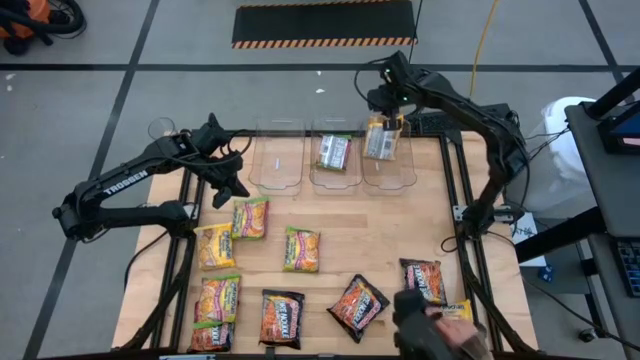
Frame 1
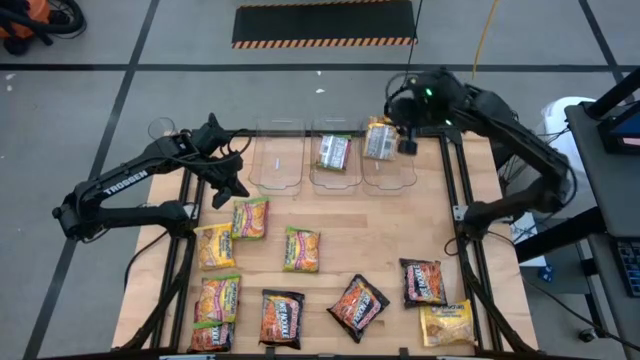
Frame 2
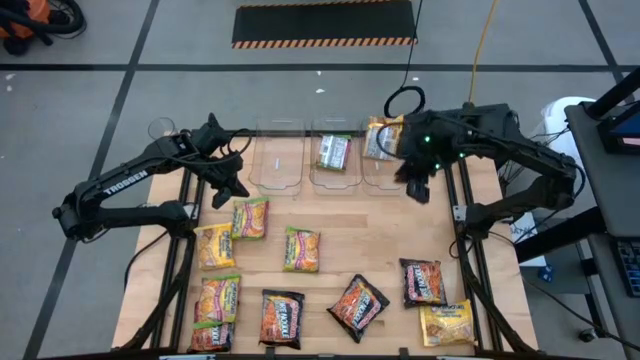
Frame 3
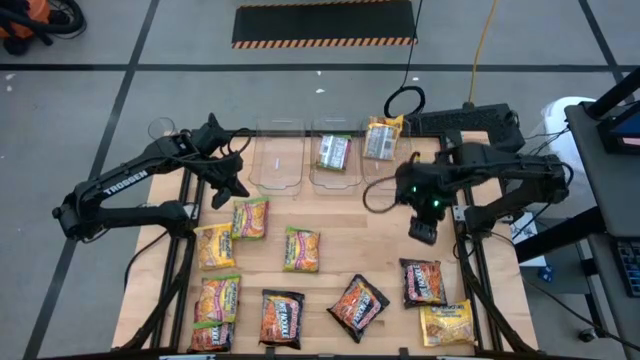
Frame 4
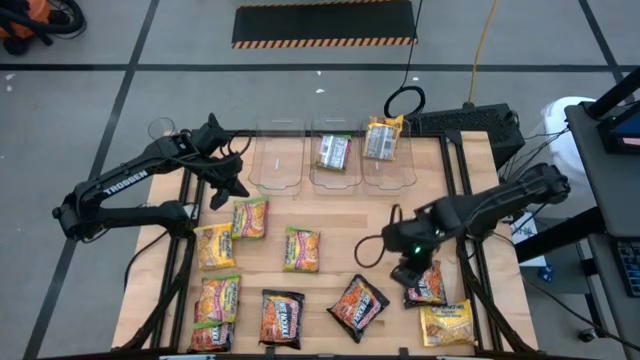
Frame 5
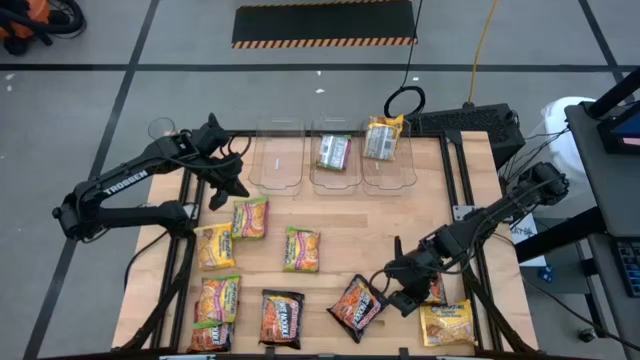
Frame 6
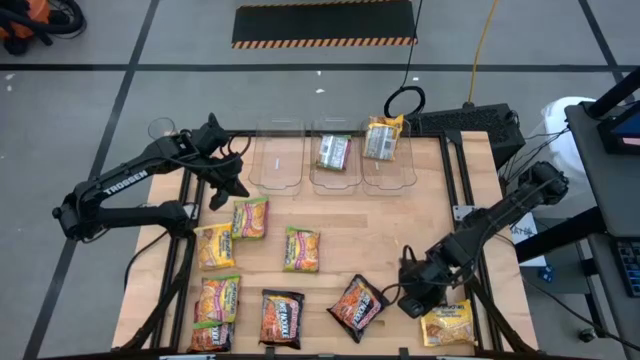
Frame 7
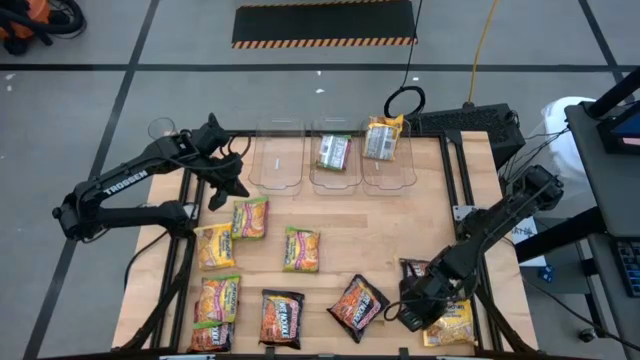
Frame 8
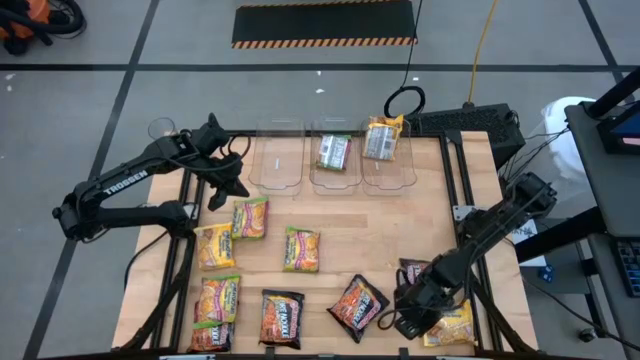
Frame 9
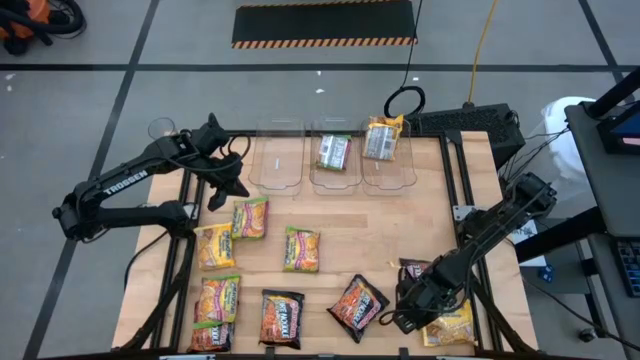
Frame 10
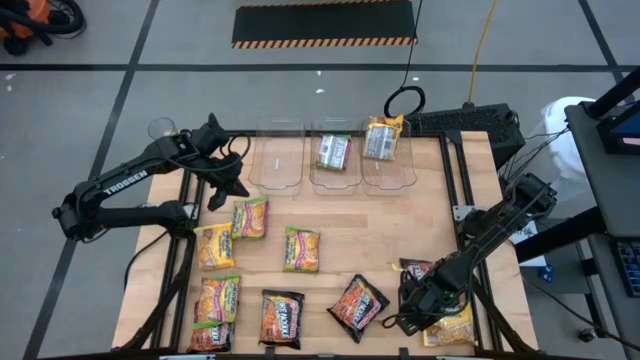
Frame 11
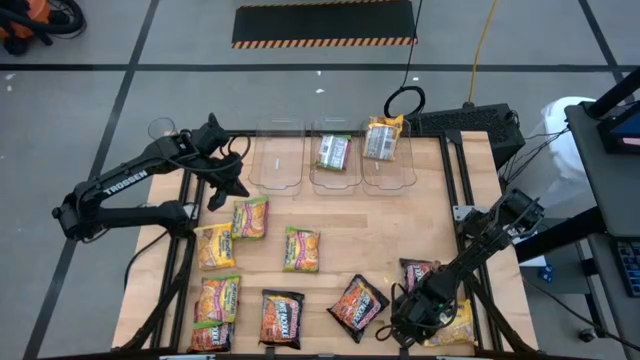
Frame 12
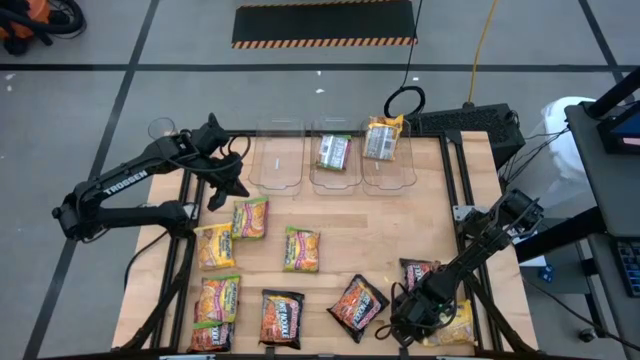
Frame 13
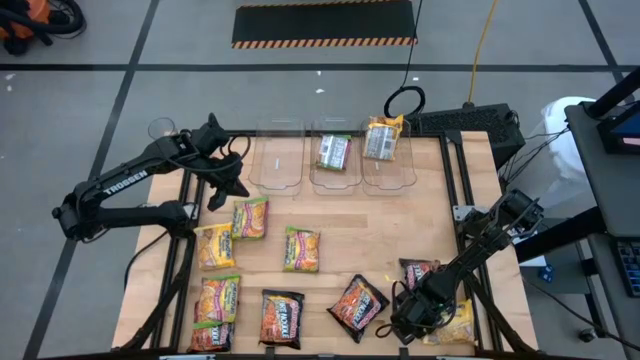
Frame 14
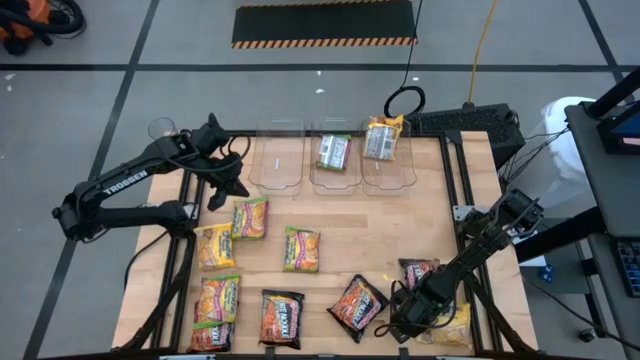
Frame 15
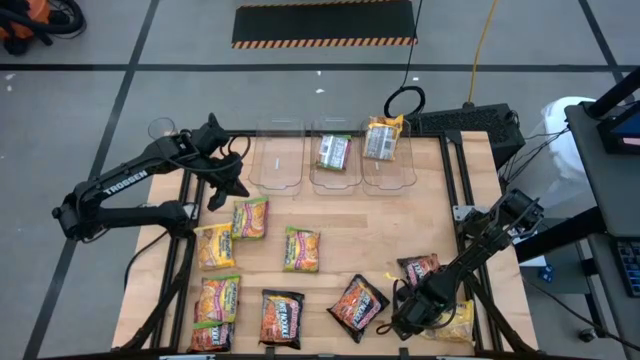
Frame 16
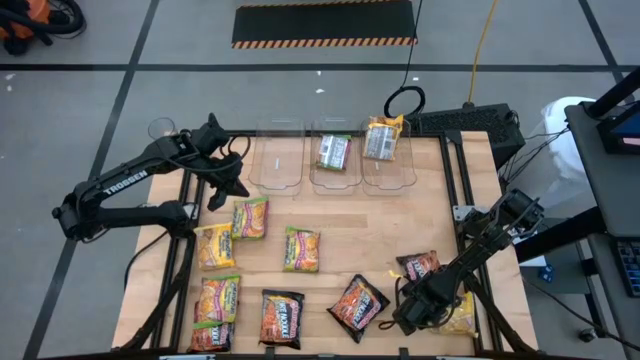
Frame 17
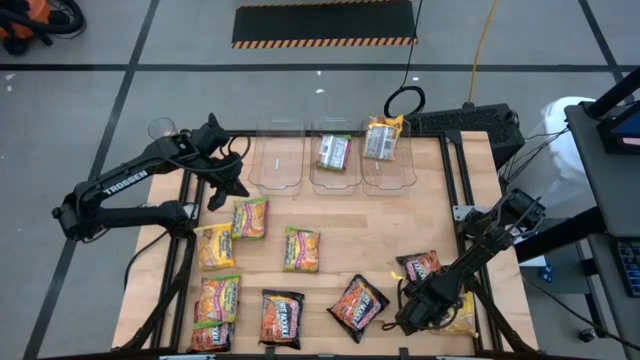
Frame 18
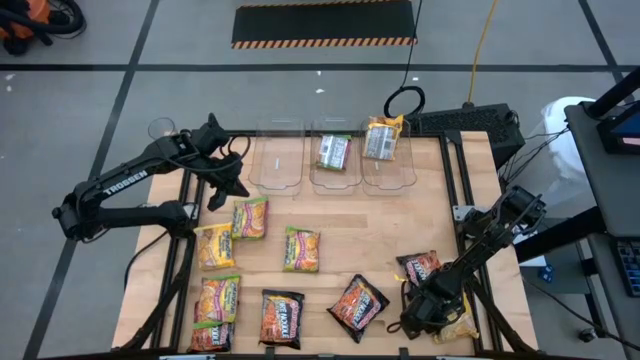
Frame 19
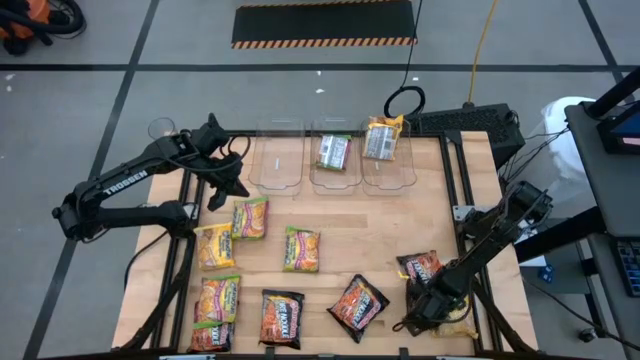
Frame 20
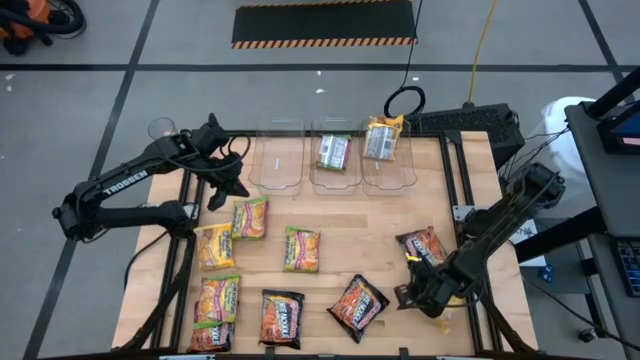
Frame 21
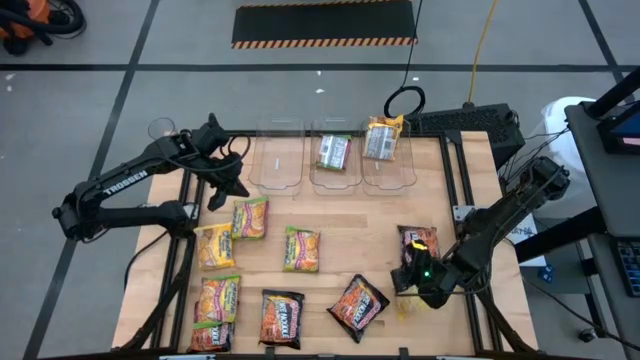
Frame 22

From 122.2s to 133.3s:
Task: Sort Maruchan noodles
Put the yellow noodle pack into the right transparent bin

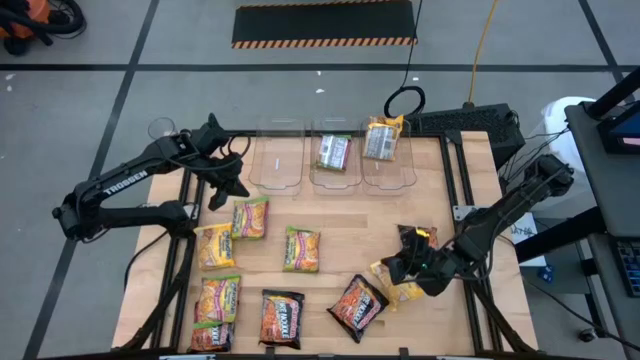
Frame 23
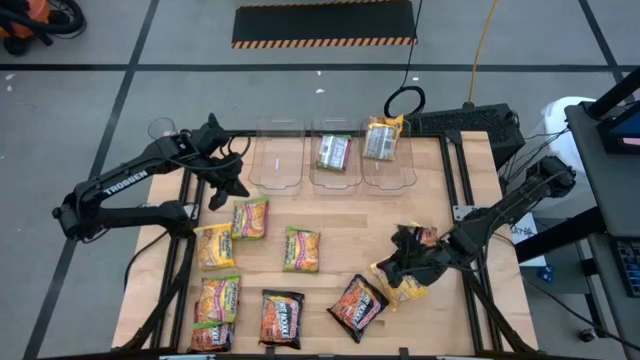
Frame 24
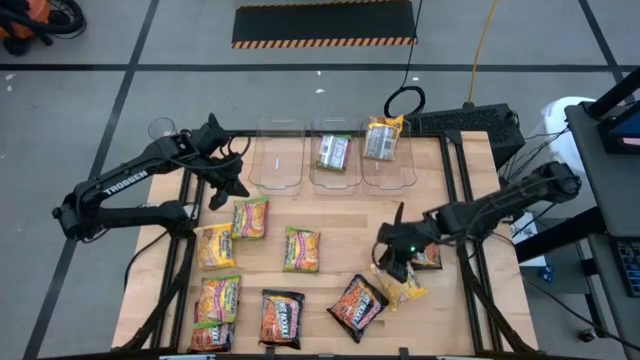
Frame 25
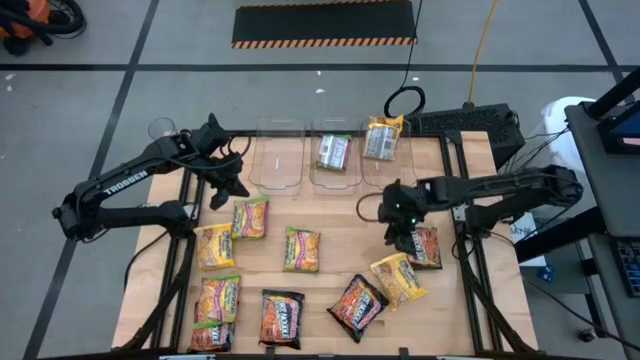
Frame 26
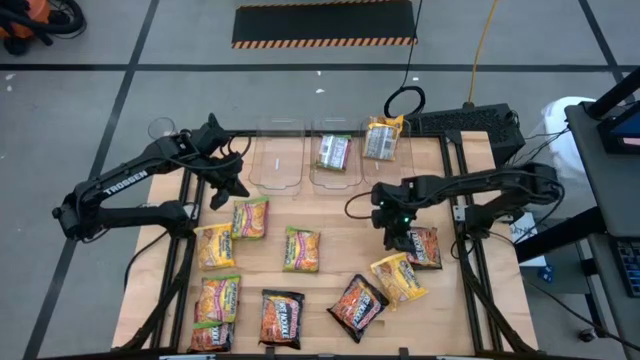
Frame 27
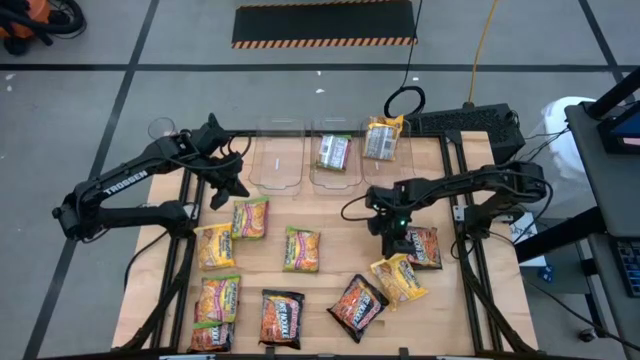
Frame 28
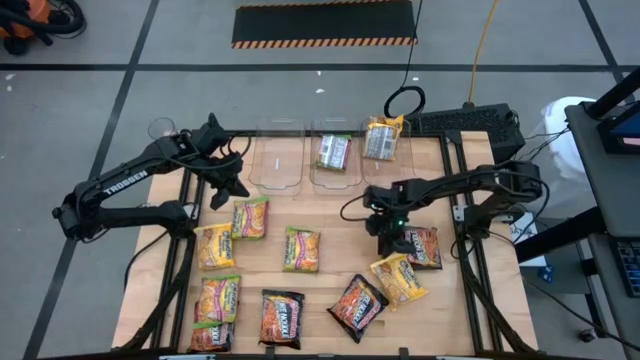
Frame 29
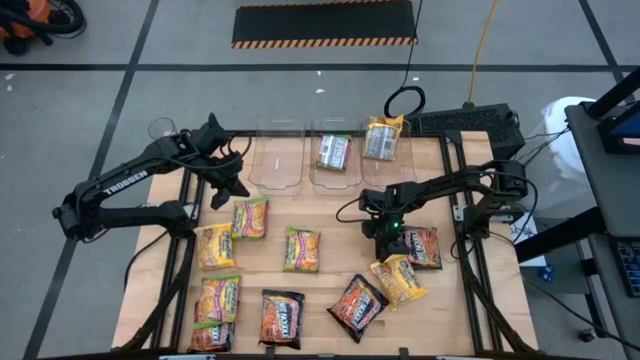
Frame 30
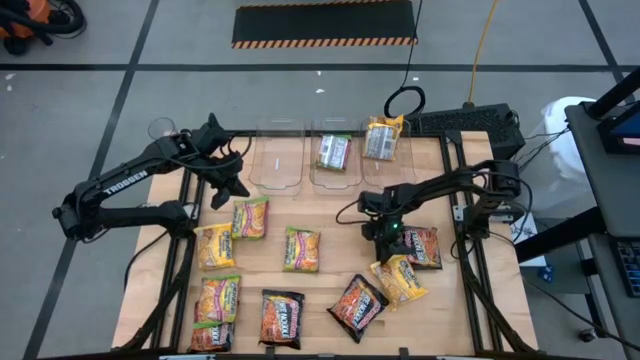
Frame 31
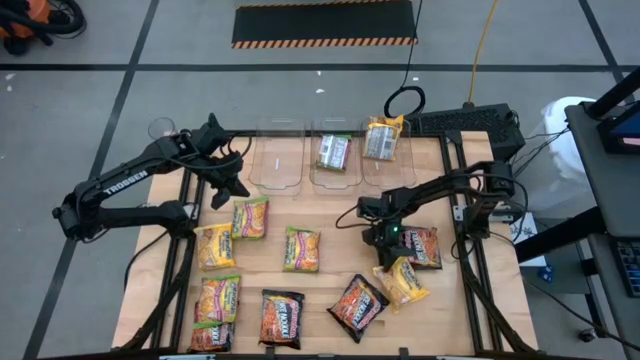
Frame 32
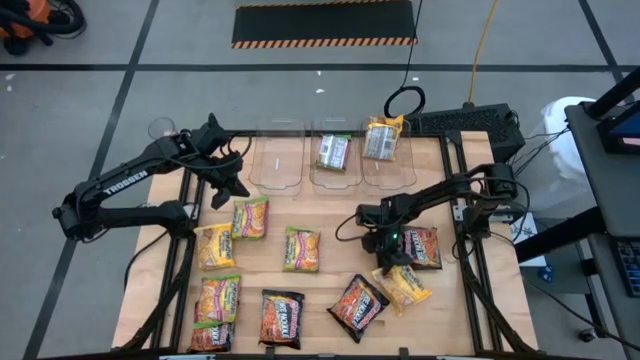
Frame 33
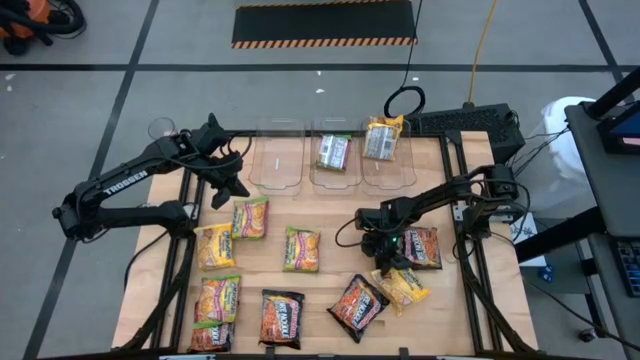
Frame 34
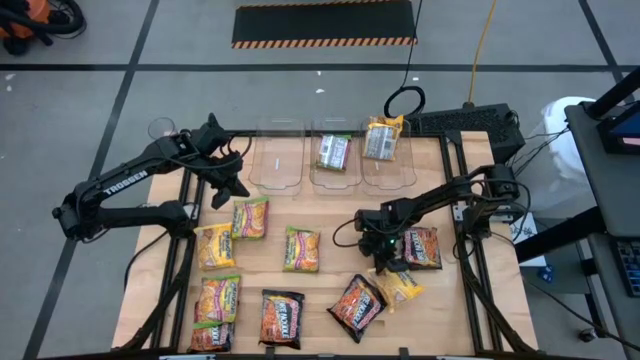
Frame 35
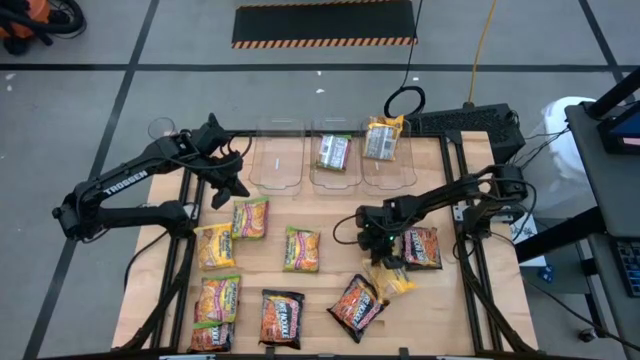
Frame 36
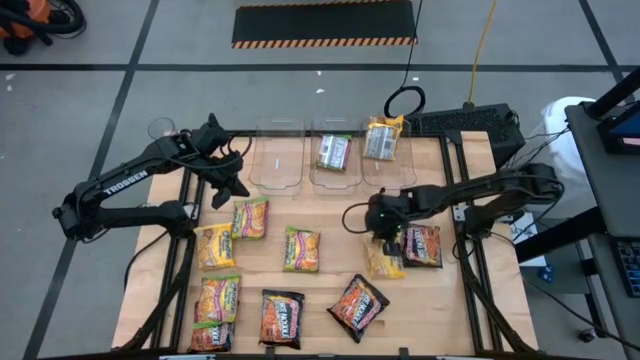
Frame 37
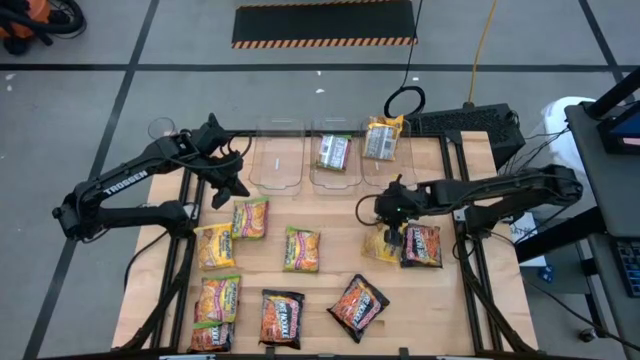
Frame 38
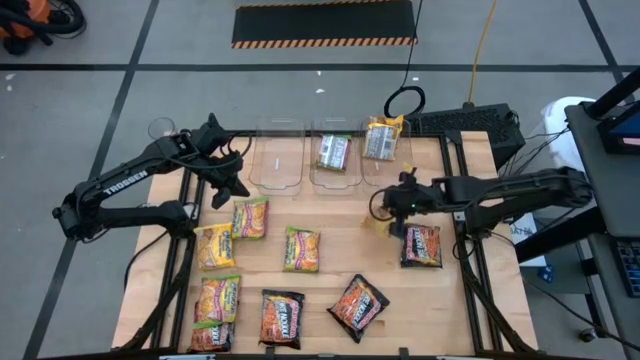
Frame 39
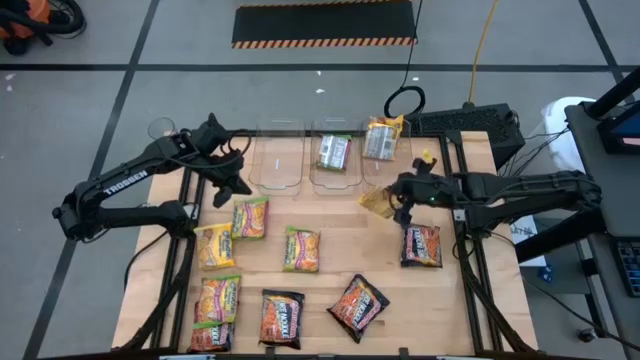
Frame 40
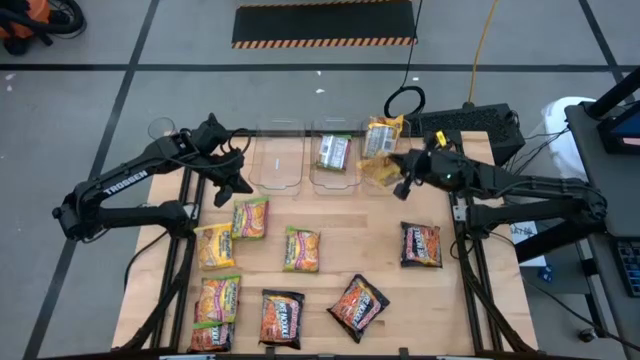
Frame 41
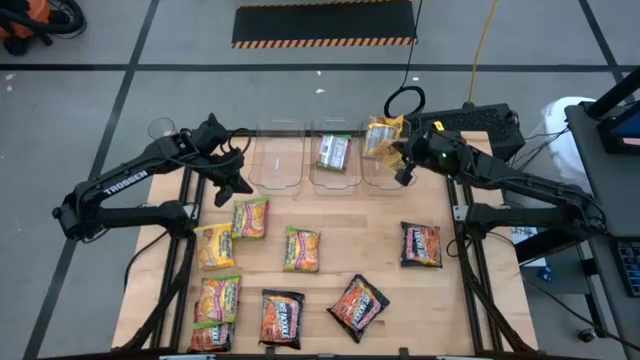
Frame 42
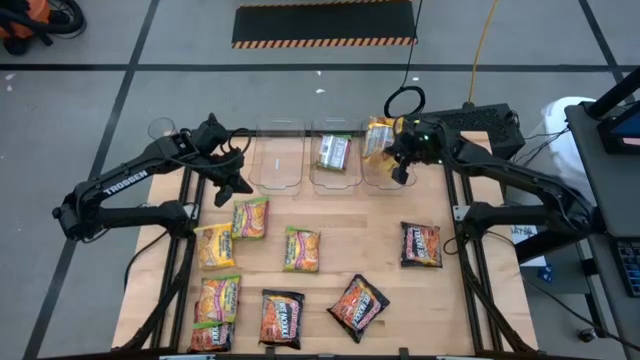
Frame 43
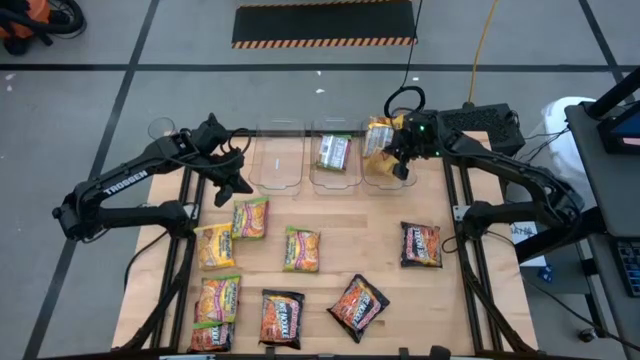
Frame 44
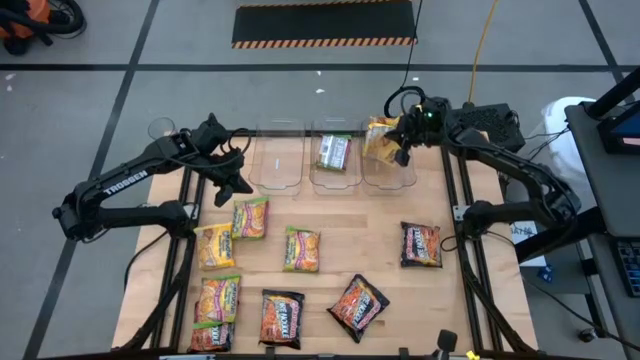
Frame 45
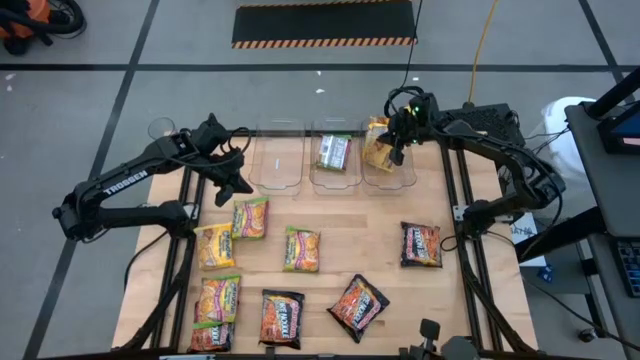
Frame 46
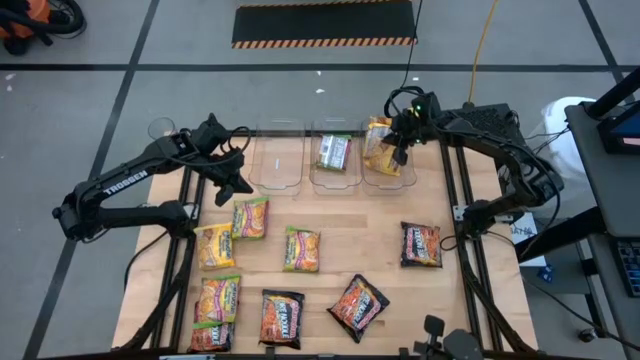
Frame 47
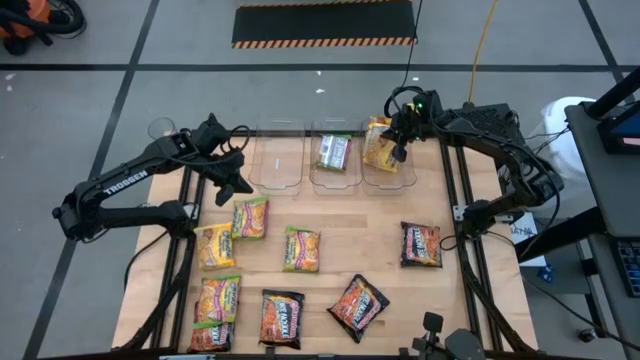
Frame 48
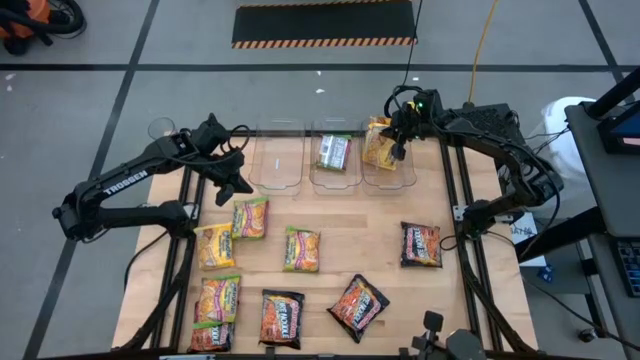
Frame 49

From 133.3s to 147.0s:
Put the yellow noodle pack into the right transparent bin
